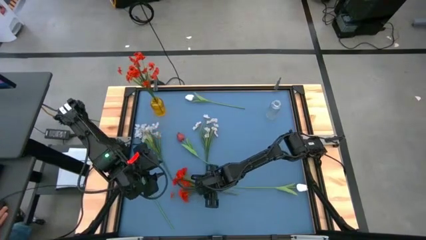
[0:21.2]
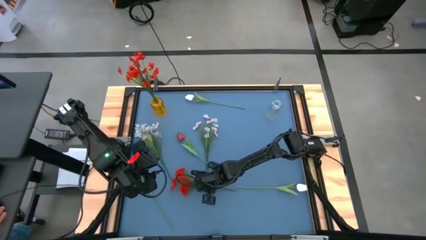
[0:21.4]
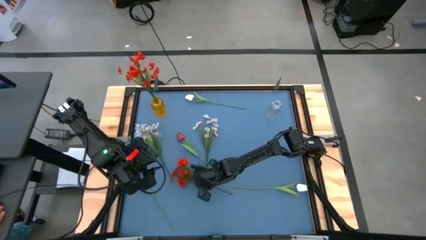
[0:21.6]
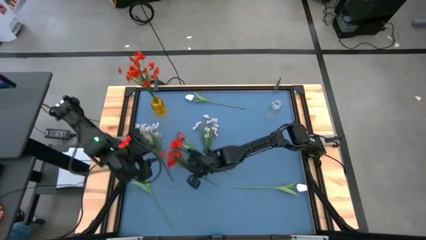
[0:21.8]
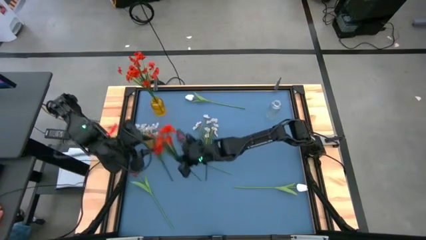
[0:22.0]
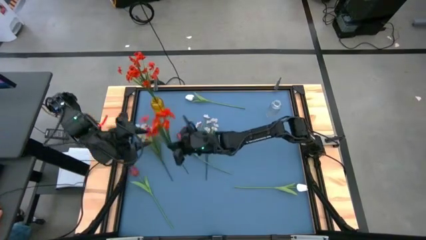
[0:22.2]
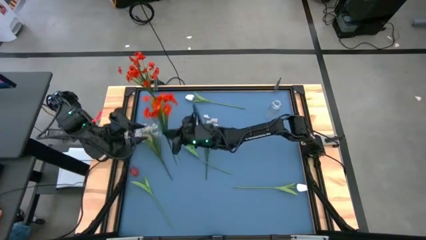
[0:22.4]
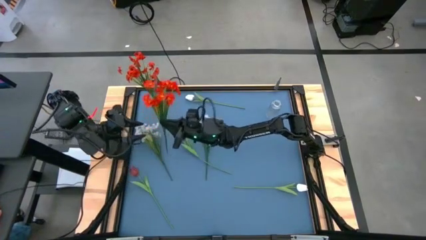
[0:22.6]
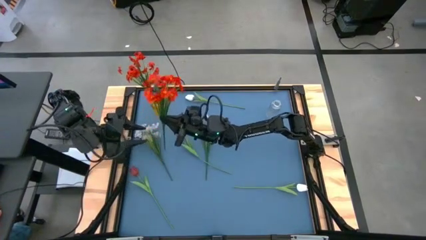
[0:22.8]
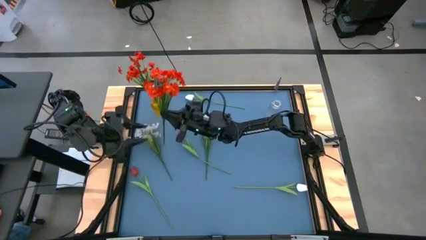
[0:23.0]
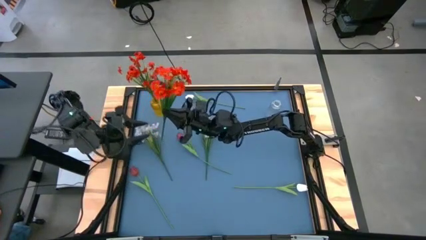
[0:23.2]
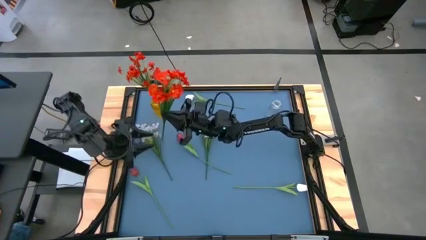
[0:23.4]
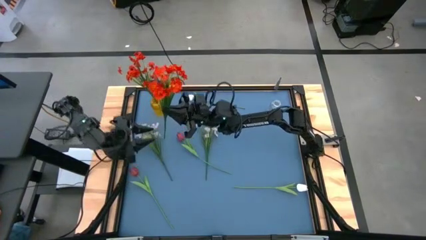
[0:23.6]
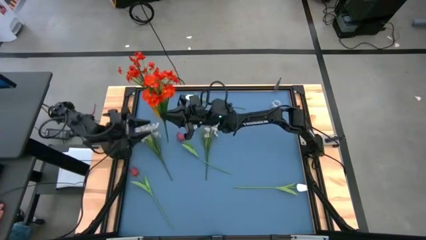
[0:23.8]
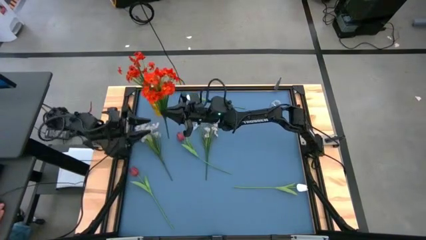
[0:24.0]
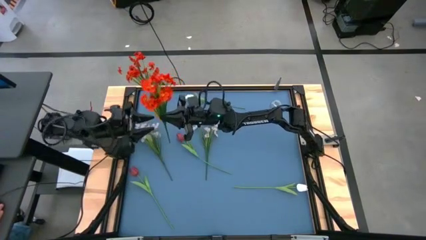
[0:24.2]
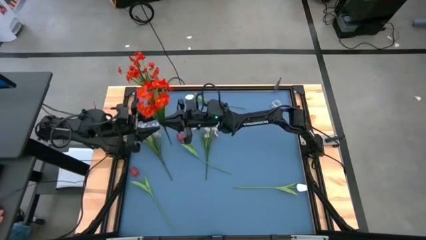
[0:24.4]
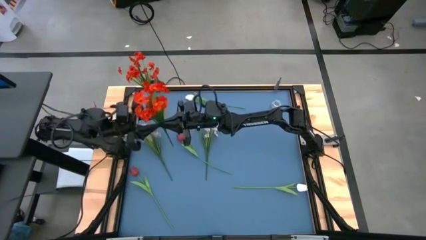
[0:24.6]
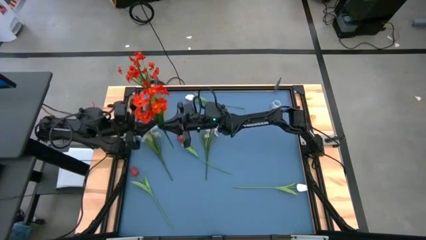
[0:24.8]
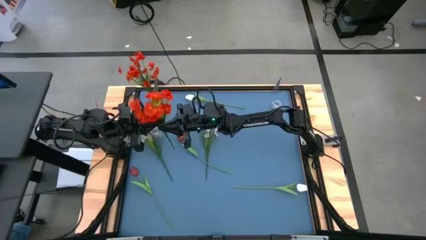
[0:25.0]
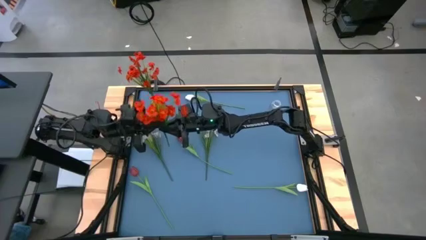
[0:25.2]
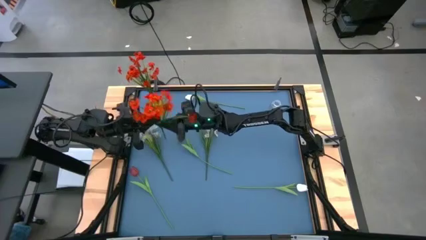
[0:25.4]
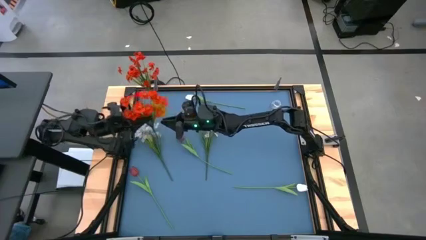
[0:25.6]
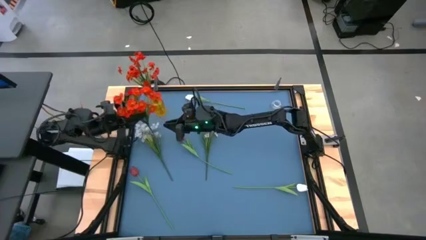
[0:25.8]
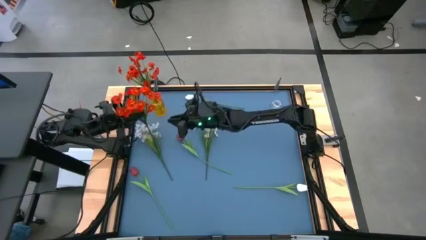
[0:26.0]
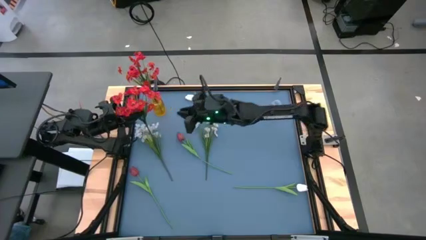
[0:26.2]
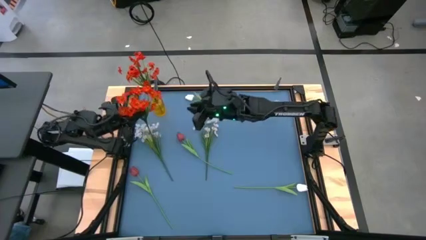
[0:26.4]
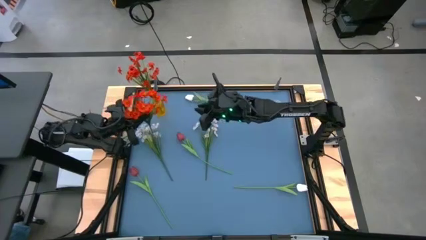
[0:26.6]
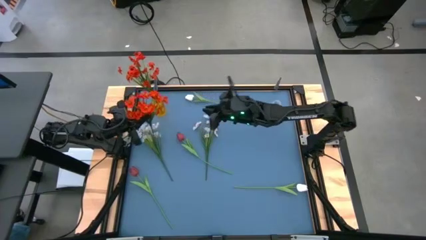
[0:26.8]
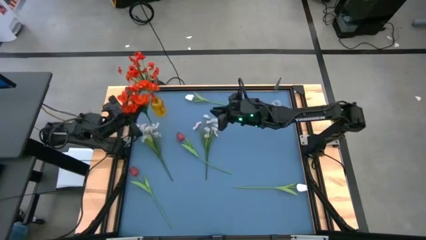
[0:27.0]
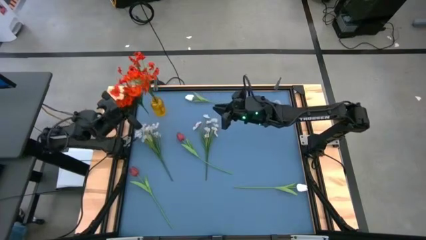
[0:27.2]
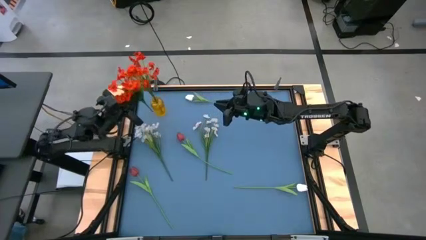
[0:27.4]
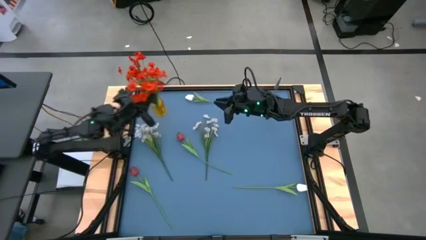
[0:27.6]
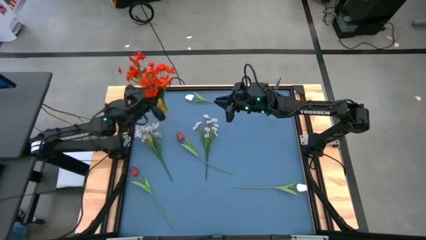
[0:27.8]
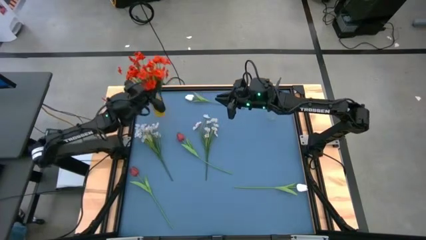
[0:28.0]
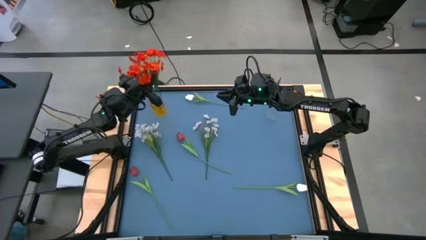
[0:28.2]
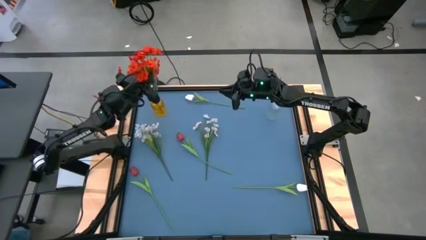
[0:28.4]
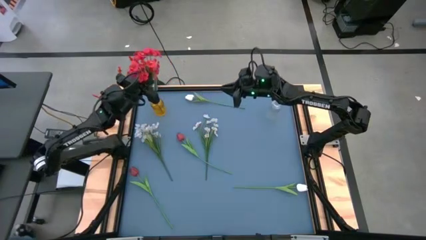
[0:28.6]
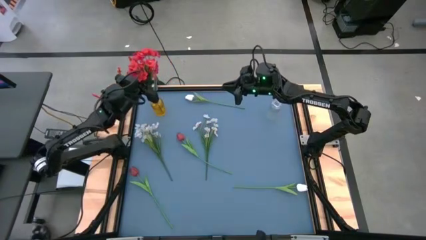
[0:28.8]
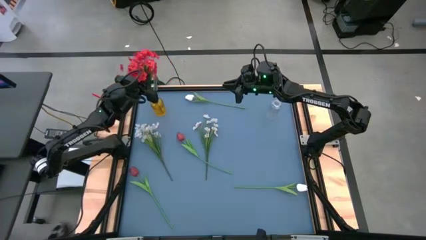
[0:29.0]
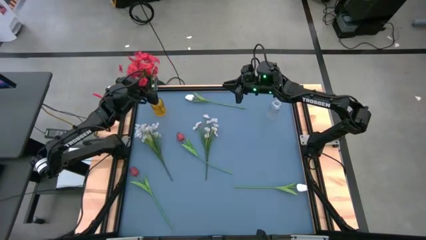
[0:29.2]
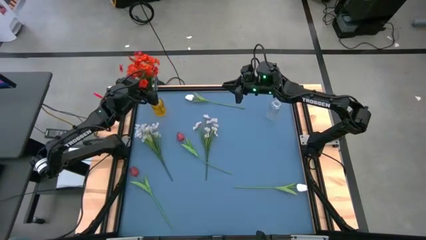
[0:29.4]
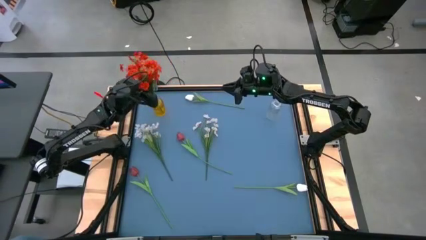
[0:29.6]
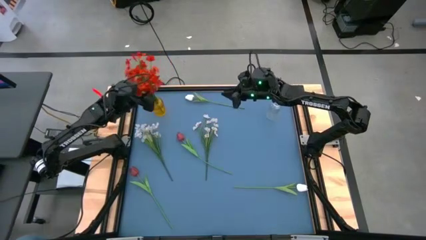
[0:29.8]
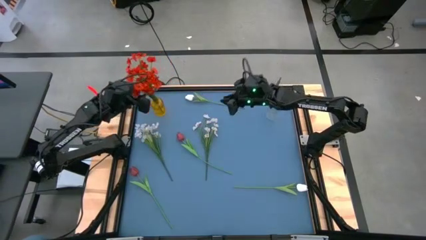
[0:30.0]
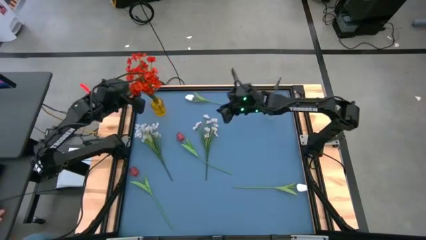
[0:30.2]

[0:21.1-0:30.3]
Task: Sort flowers into vase by color
Put the red flowers into the yellow transparent flower vase

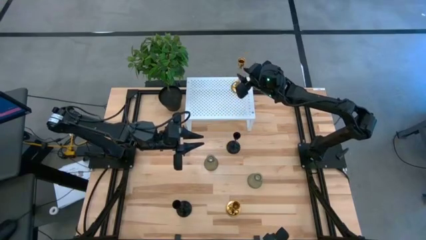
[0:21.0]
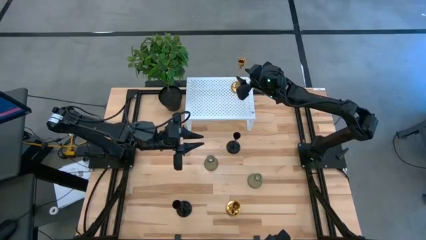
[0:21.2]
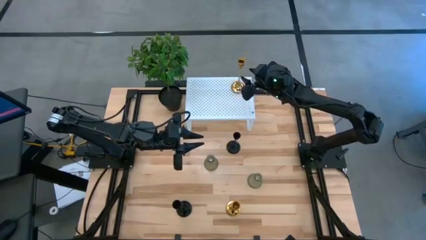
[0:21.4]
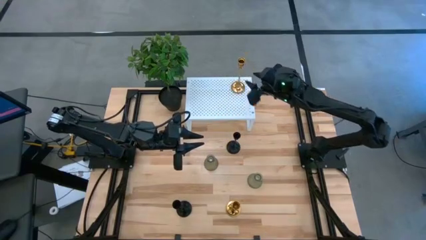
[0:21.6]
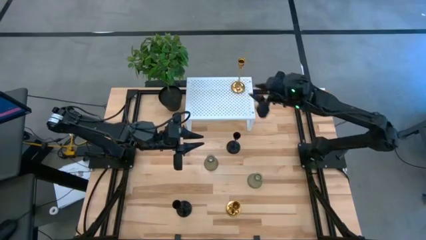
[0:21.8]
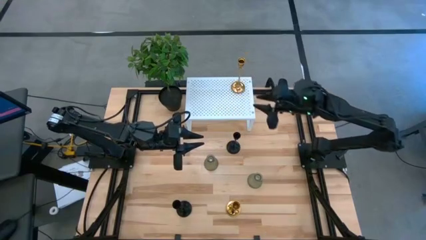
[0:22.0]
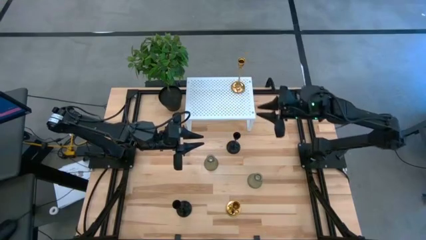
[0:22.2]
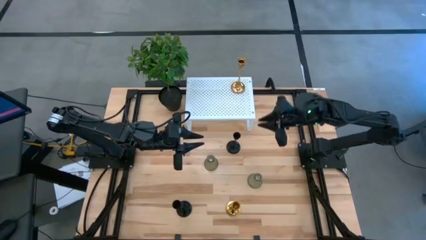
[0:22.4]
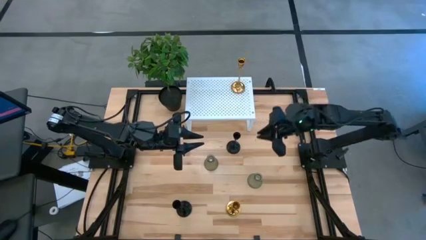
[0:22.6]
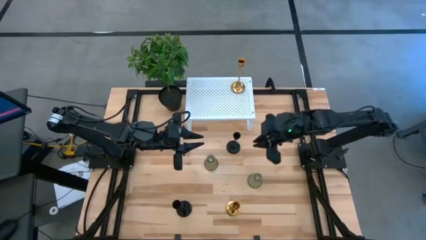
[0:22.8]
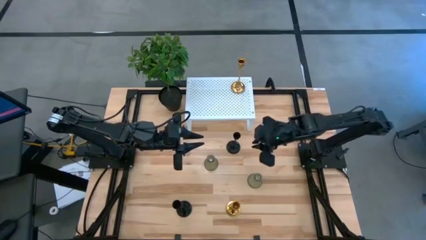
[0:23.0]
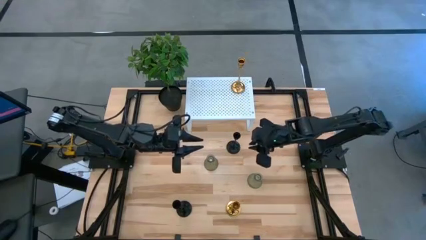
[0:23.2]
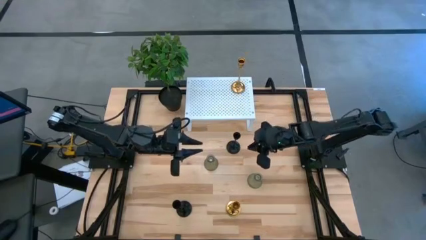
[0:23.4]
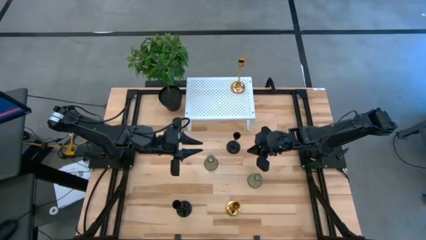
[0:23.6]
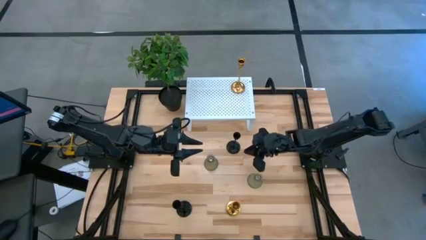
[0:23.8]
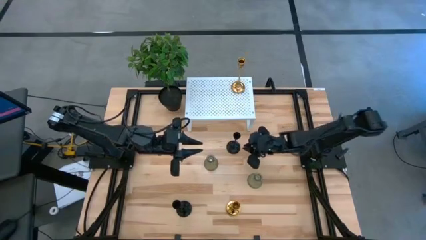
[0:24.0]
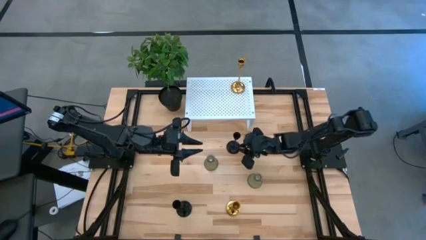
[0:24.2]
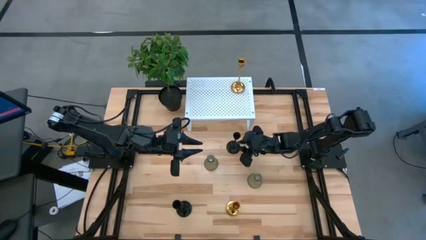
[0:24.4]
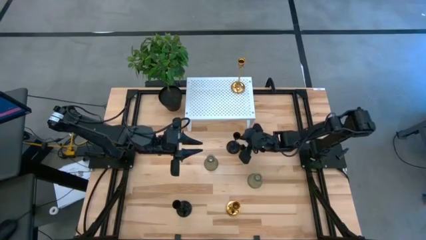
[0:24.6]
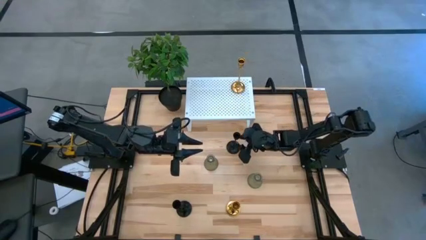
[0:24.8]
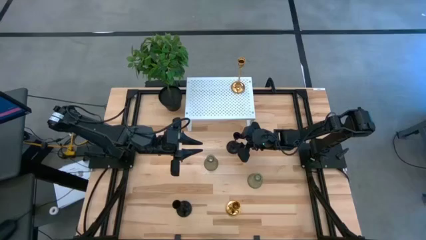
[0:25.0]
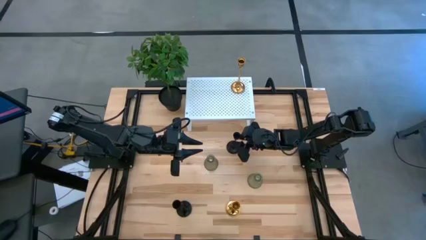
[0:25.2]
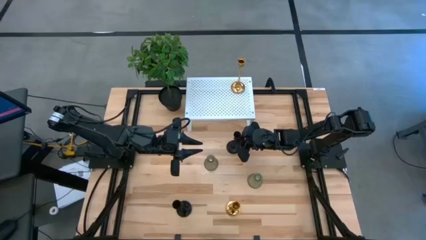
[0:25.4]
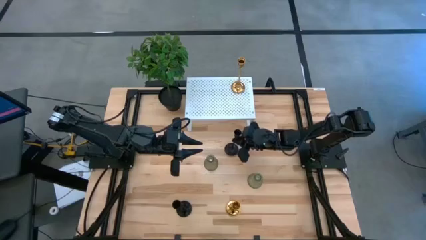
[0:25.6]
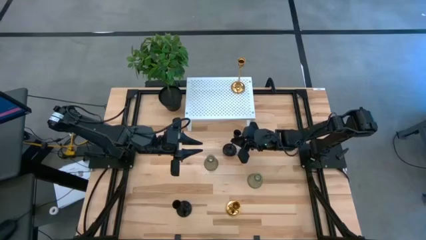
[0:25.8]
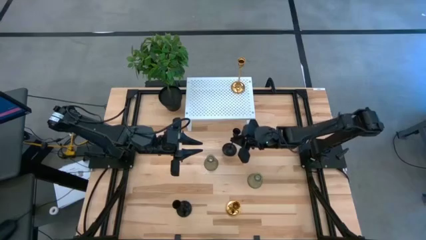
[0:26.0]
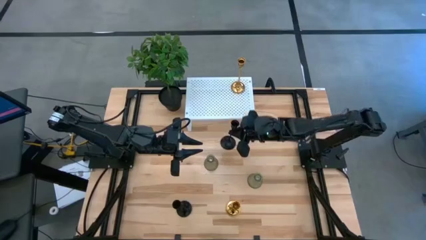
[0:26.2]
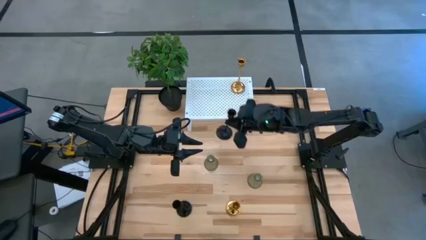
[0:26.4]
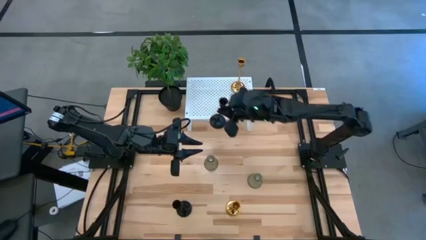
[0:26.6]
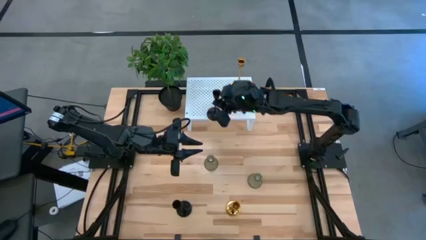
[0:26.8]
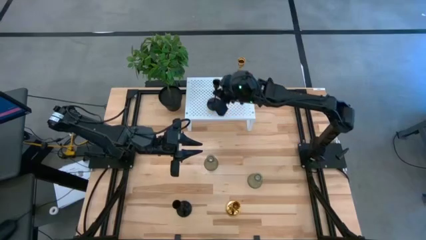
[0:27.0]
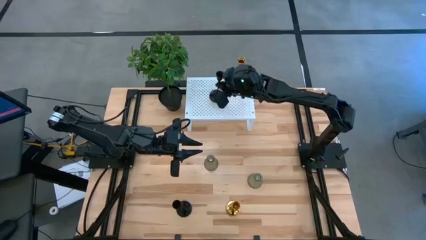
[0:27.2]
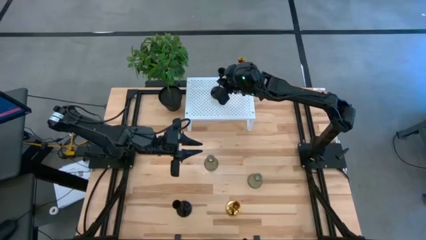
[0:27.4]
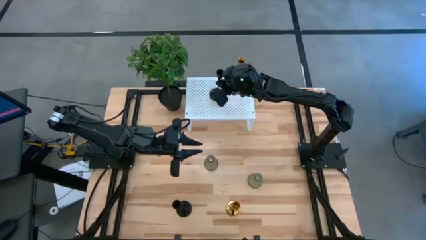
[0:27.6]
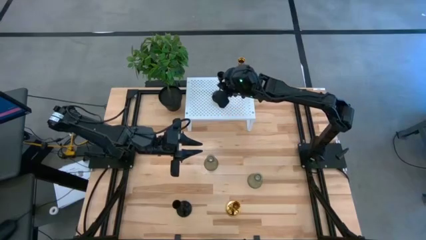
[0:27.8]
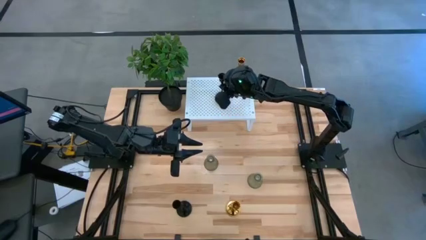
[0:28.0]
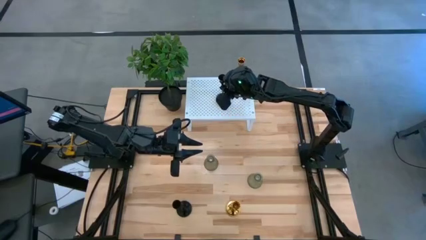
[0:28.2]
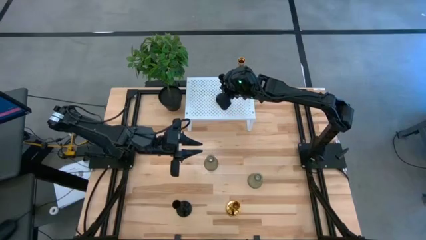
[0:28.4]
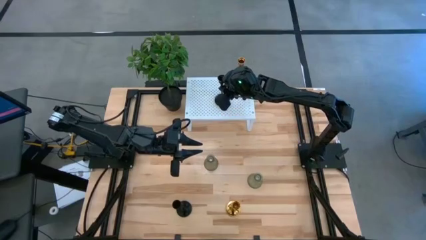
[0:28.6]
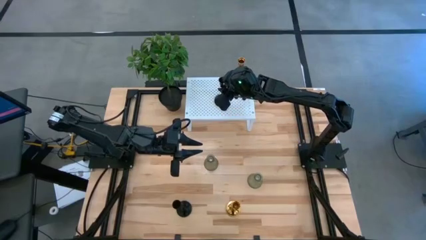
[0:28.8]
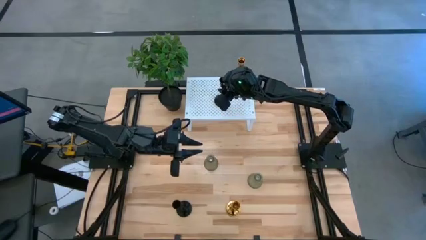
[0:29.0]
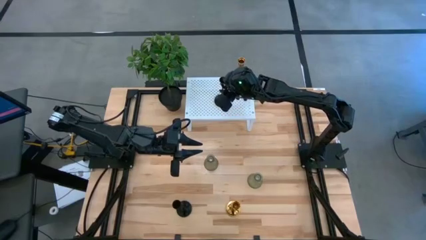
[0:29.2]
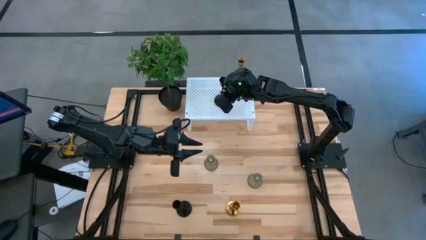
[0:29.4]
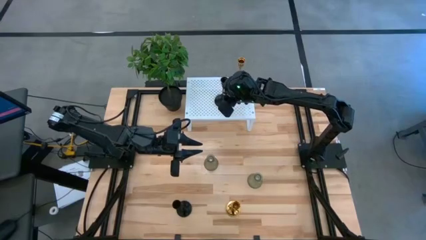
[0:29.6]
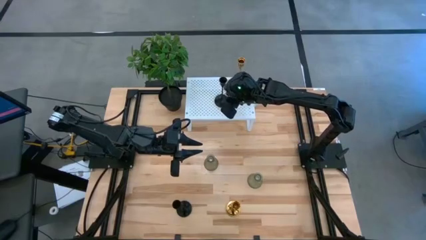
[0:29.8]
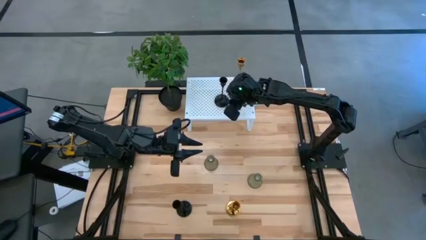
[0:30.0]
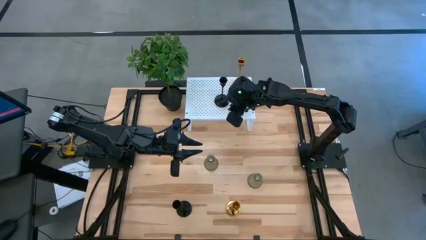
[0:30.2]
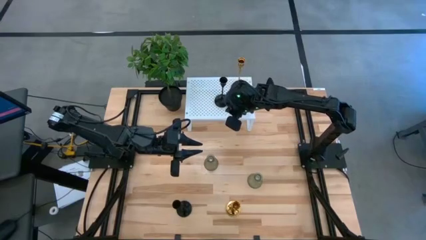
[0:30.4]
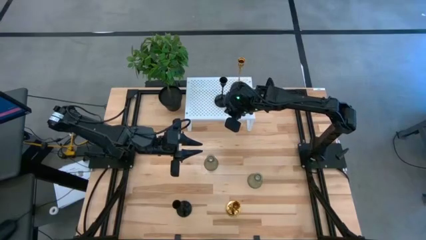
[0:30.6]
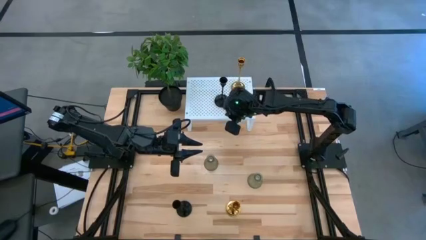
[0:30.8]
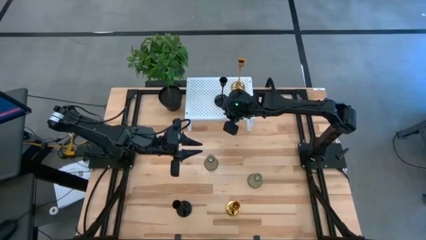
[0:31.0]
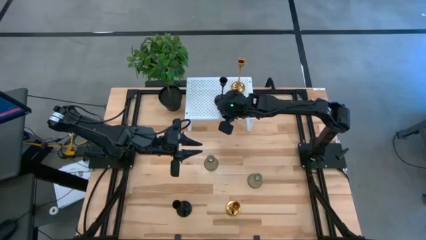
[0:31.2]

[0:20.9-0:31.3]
Task: Pick & Place candle stick holders
Put the top black candle holder on the shelf
